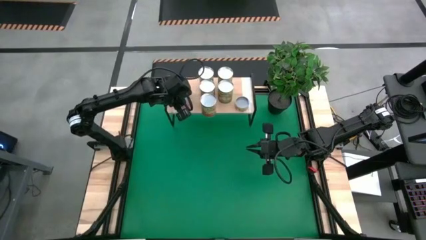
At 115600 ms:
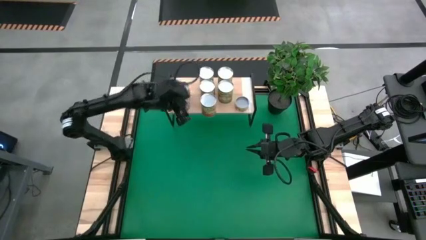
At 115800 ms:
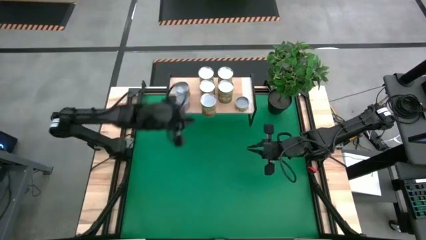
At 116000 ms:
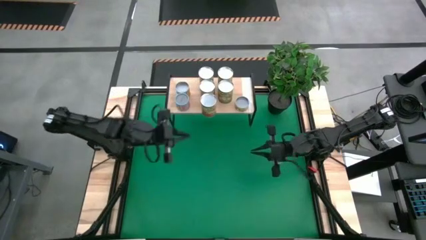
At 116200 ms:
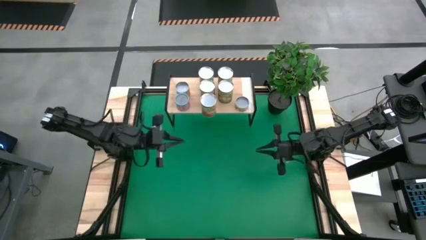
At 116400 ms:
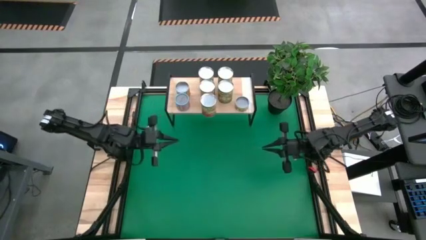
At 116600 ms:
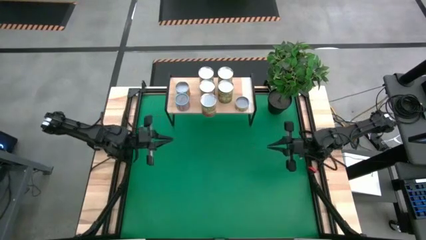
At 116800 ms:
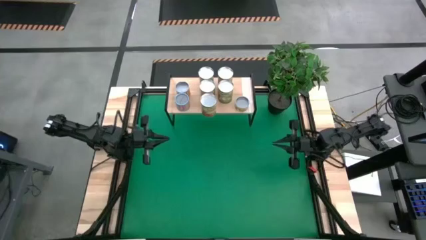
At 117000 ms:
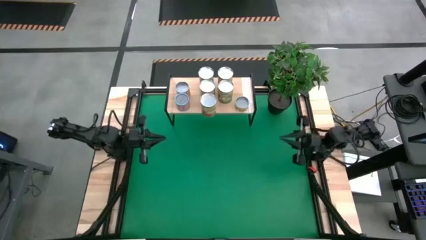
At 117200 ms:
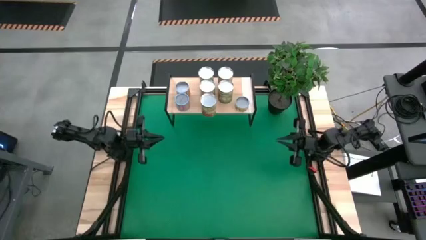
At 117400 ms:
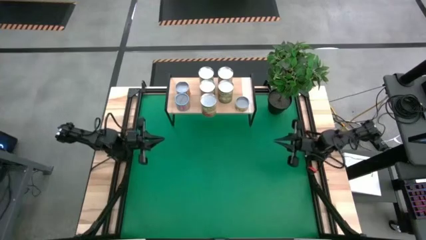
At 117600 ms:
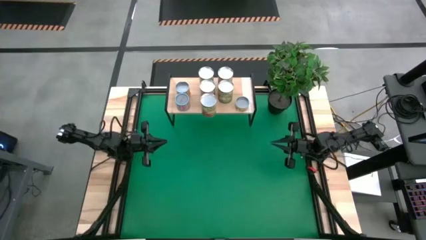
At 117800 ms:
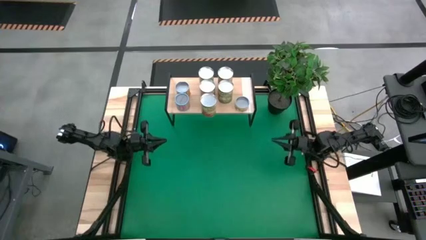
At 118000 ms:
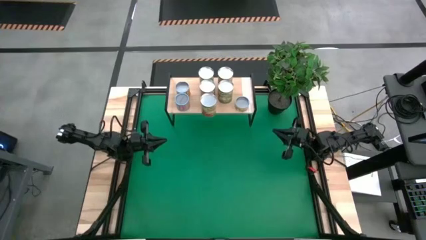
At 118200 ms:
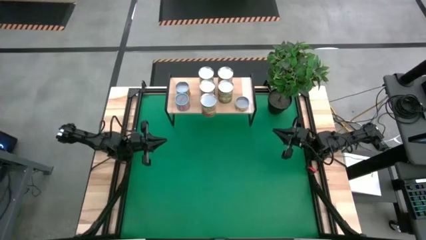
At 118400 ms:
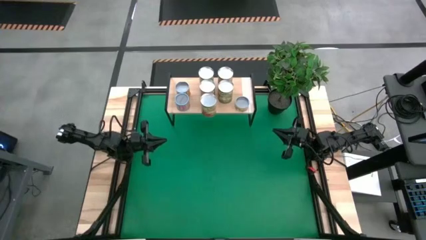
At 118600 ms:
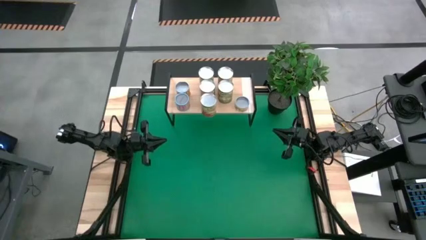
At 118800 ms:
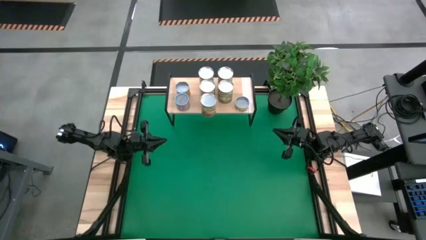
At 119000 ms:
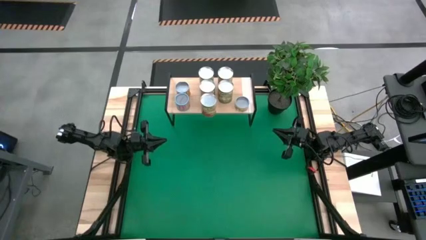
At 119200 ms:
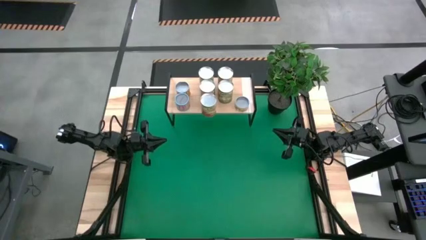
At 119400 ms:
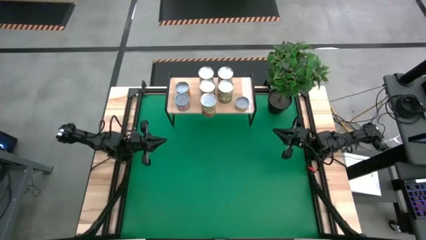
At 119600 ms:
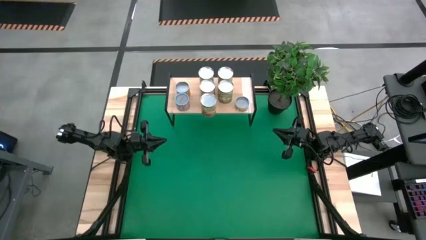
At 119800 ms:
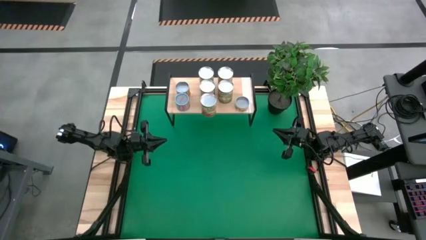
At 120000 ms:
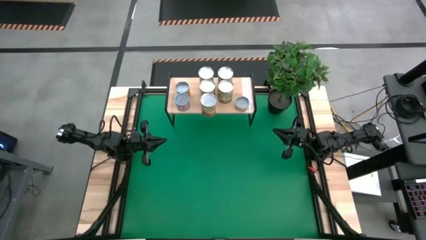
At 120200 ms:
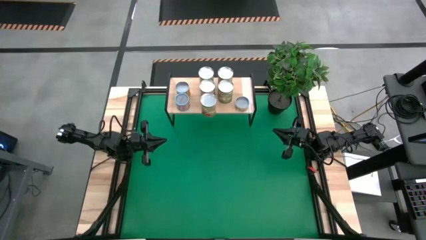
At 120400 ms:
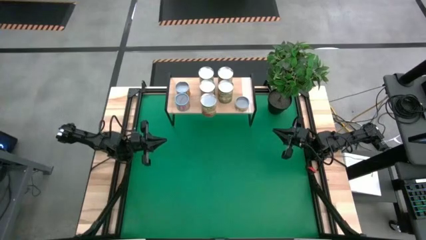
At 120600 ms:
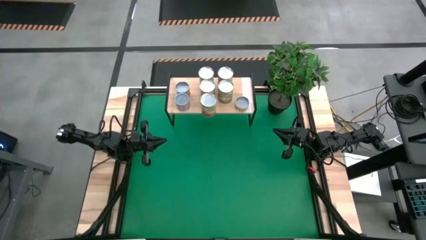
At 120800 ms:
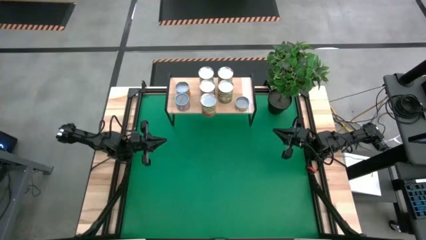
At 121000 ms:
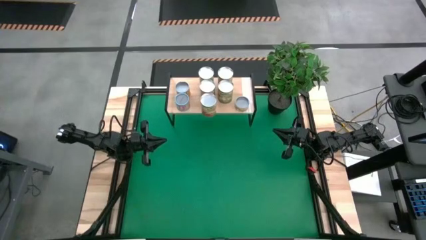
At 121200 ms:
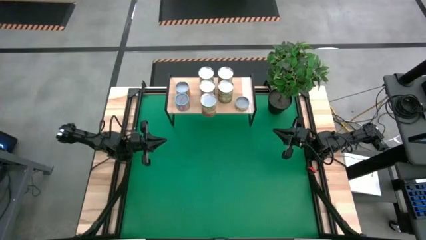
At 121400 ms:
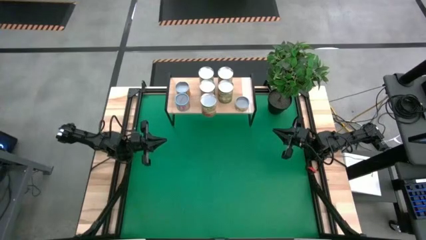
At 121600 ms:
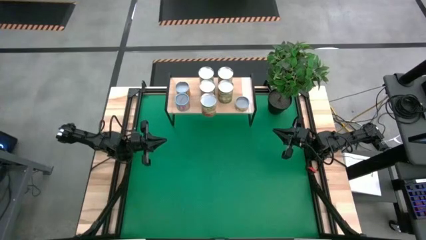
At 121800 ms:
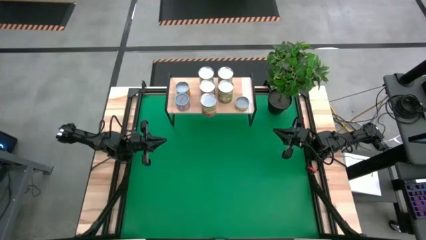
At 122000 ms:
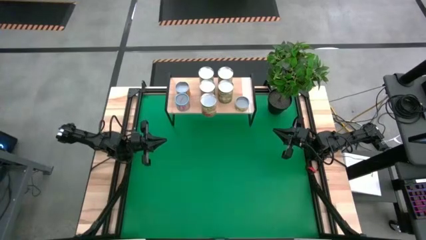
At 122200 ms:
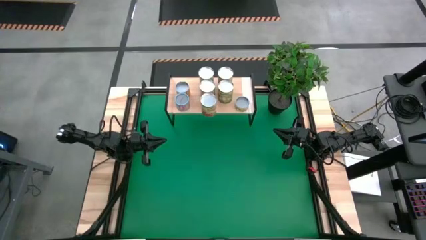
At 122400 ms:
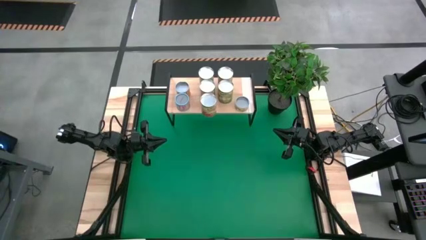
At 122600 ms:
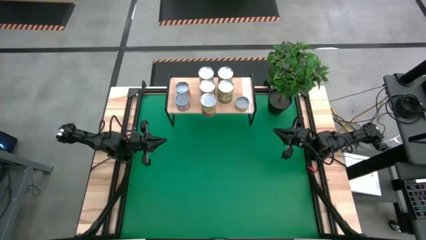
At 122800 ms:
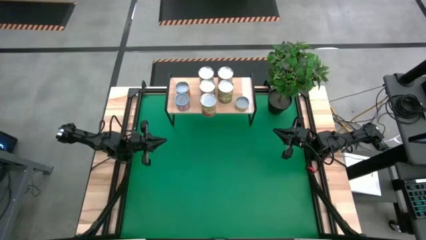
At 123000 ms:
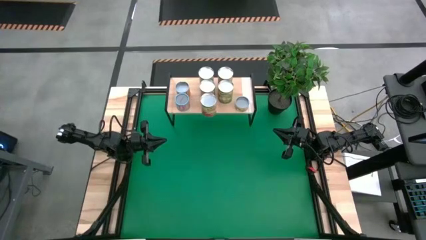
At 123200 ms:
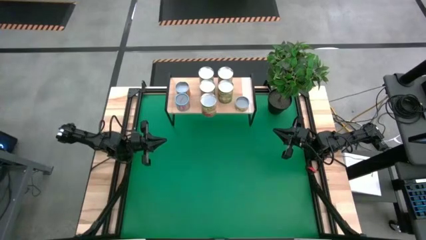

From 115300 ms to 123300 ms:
Task: Pick and place cans onto a shelf
Return to Home Position

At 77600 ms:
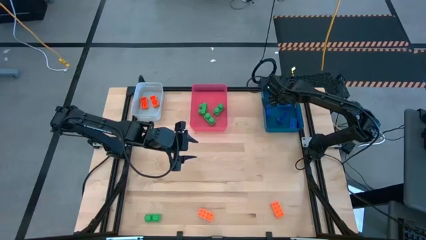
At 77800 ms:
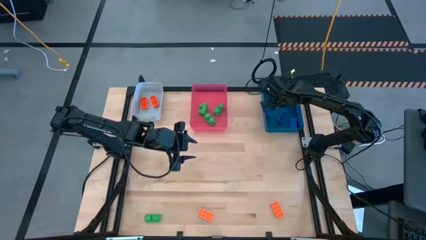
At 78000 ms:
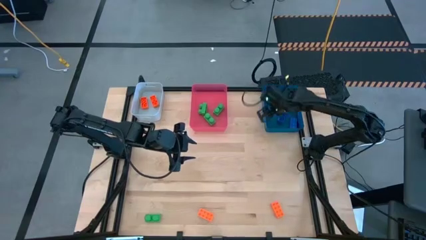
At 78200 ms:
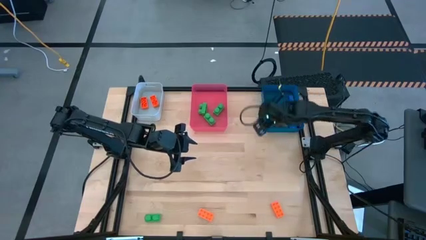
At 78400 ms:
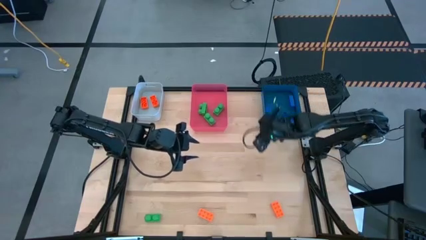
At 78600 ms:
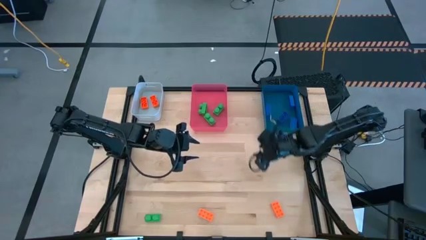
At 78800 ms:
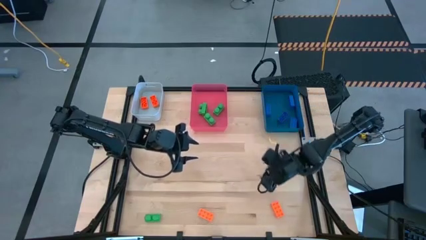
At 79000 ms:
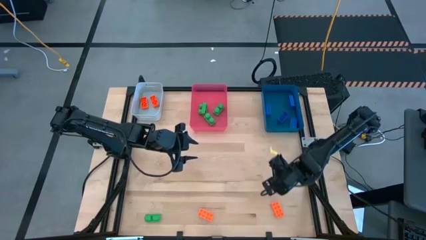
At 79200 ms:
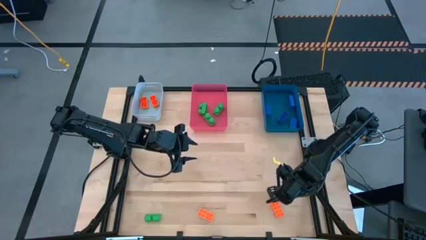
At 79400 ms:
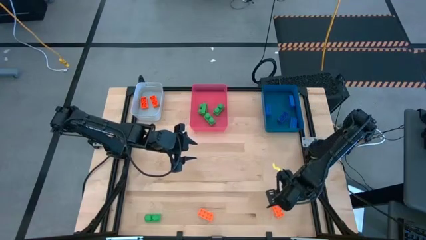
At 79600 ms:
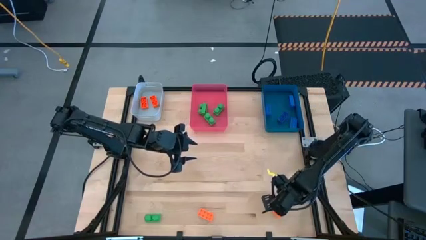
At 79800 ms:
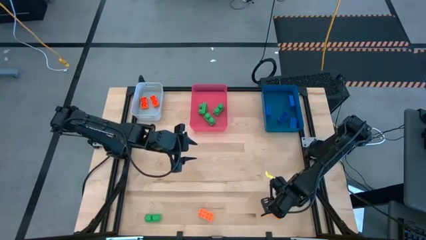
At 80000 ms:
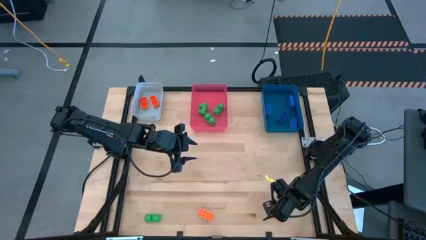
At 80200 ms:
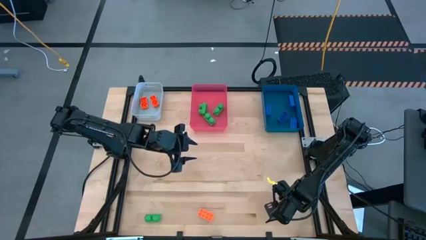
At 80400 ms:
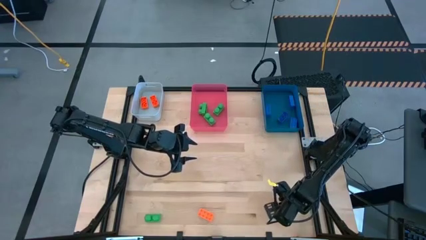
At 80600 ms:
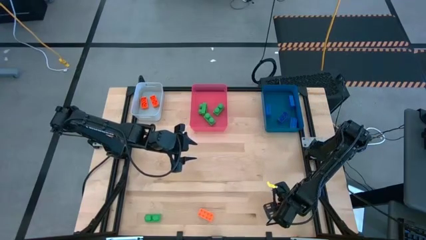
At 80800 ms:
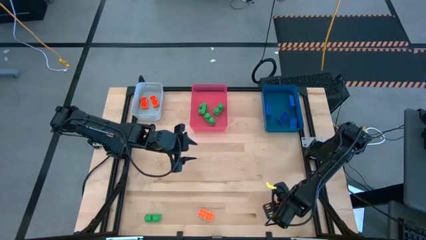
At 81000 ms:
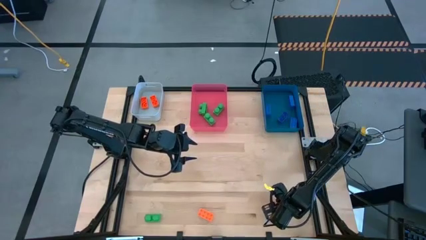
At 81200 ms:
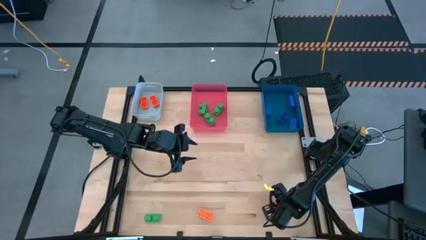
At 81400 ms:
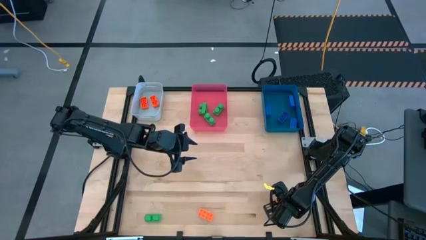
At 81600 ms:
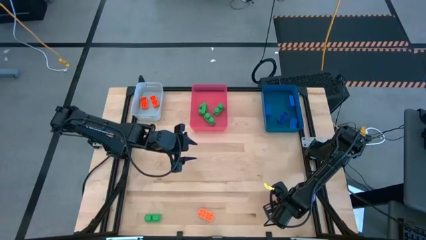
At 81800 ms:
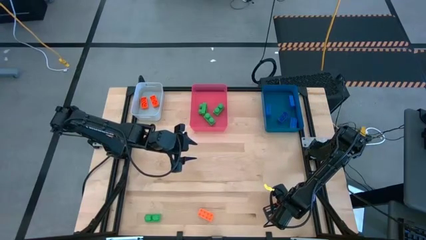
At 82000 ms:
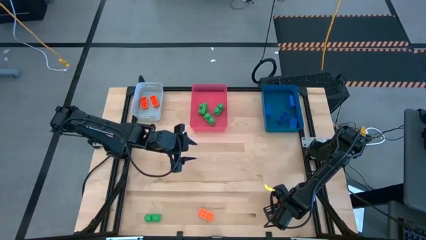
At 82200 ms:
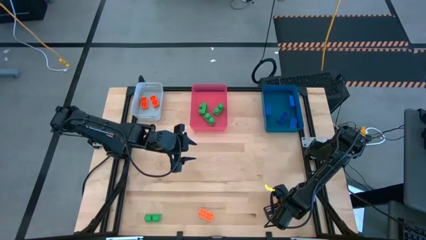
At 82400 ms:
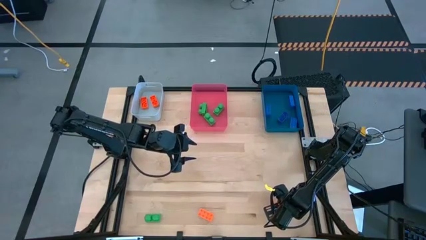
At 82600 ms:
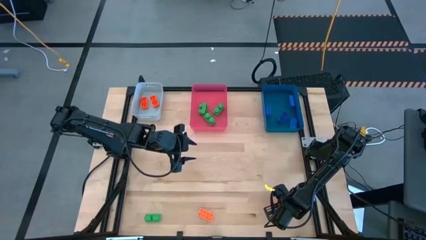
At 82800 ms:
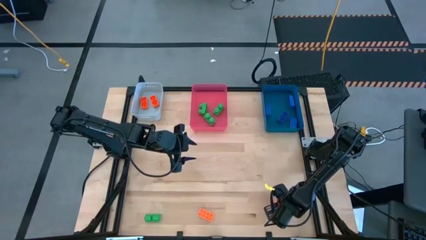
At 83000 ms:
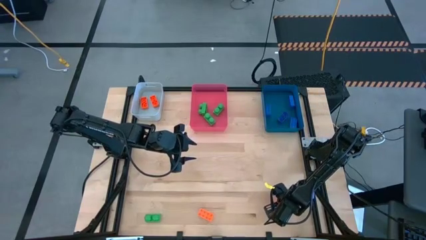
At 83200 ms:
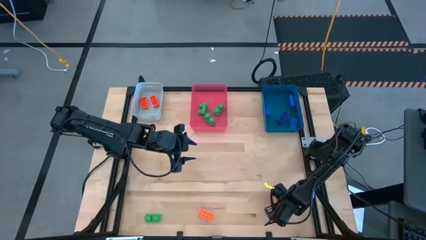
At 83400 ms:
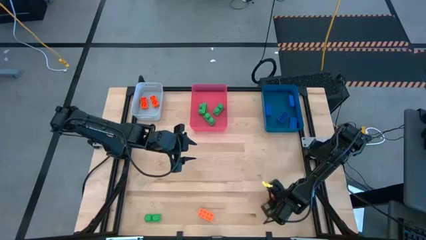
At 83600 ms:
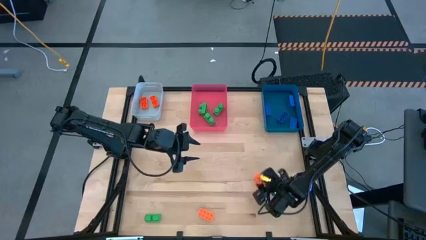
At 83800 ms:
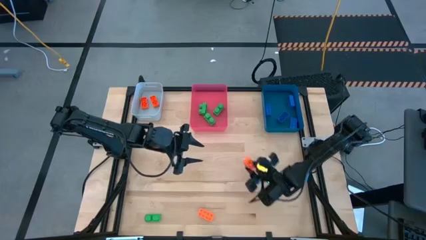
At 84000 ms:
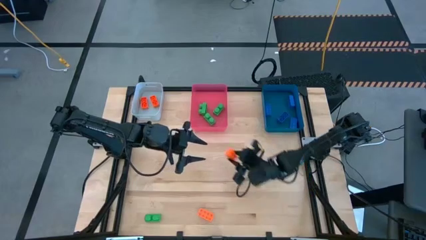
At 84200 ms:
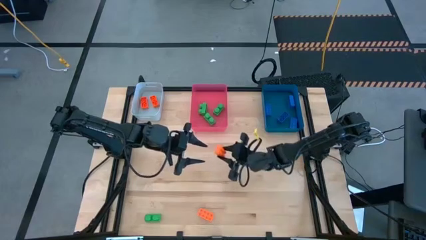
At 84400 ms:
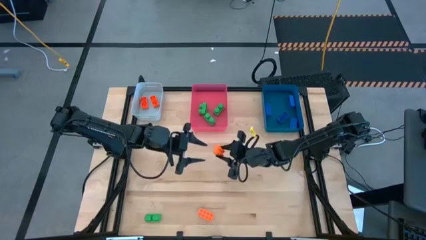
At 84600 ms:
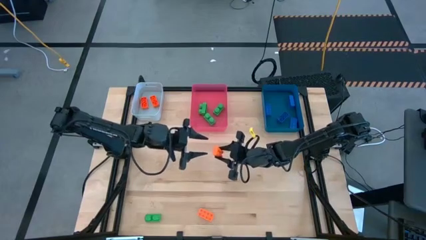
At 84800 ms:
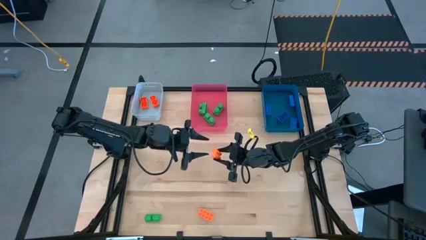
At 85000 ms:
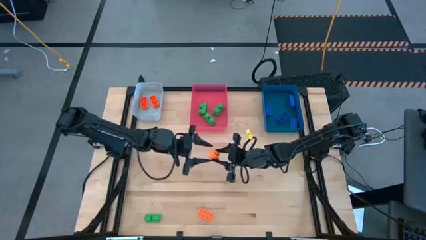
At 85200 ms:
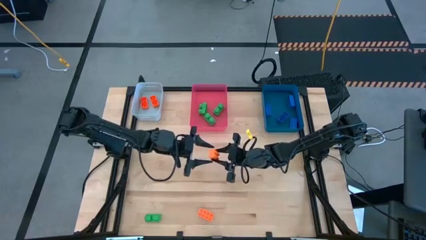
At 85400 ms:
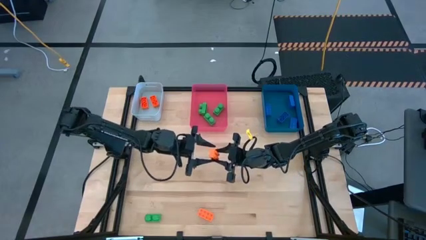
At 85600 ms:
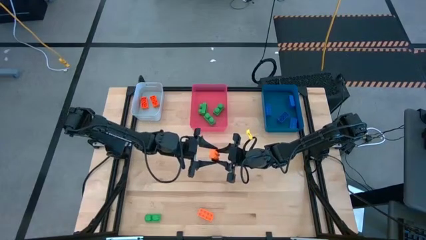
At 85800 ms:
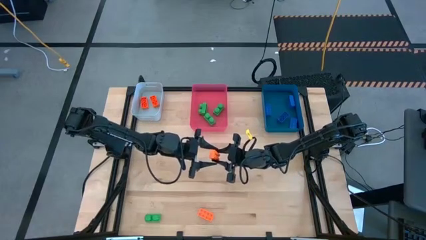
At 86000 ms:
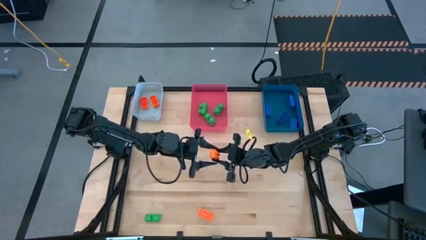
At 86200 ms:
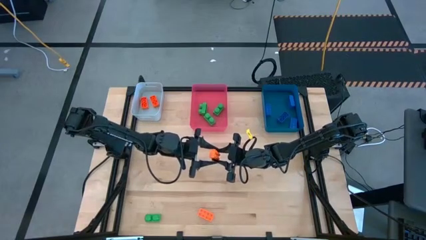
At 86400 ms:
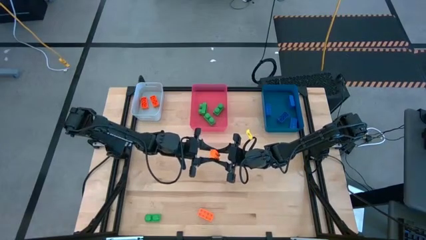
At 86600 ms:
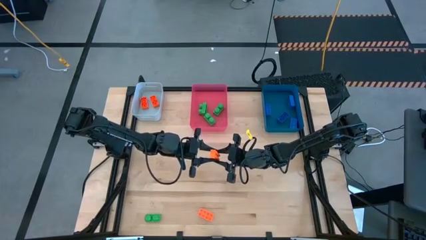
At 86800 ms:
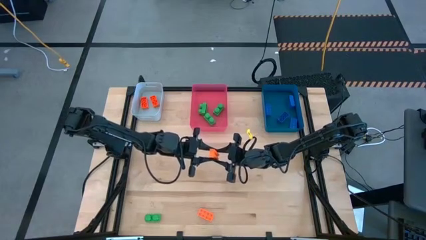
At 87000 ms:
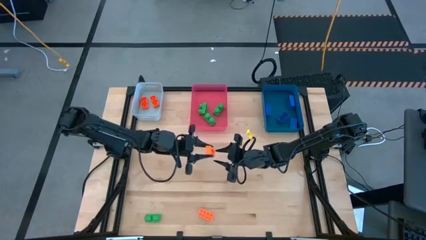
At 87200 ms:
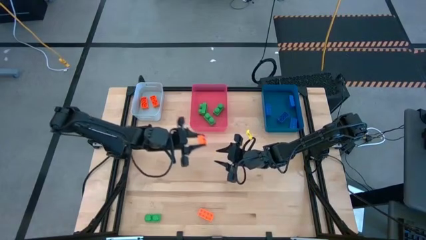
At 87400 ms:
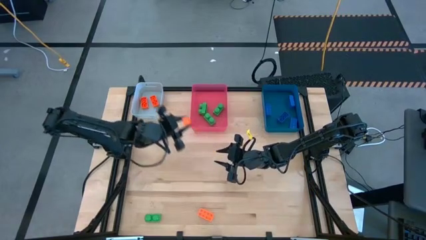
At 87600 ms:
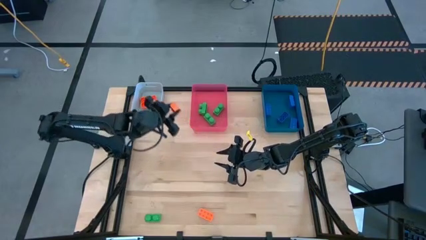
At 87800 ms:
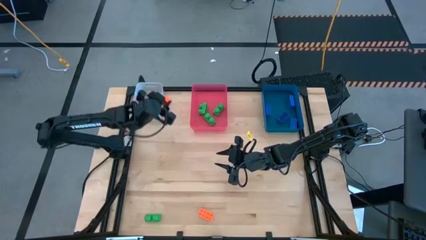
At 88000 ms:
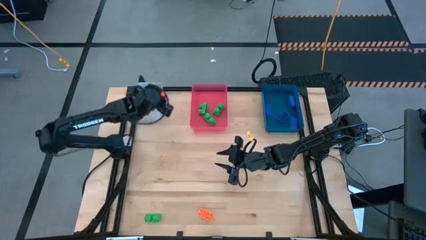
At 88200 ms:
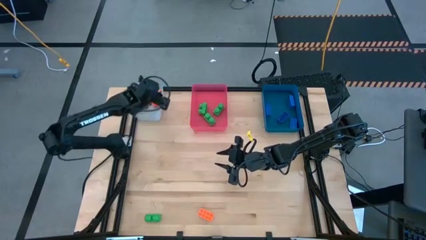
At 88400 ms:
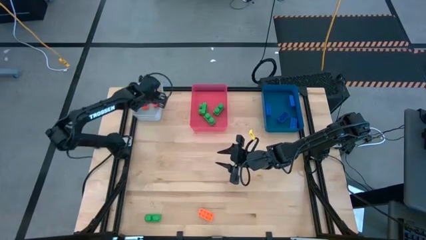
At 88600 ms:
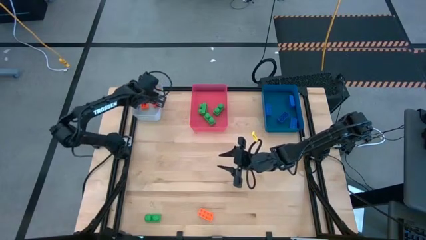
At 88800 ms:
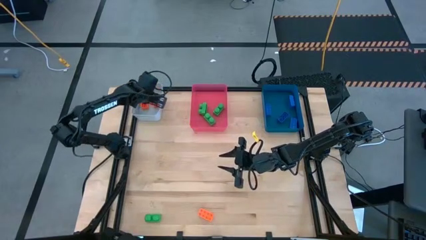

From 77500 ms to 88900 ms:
Task: Sort & place blocks by color
Put the orange game piece into the white bin
